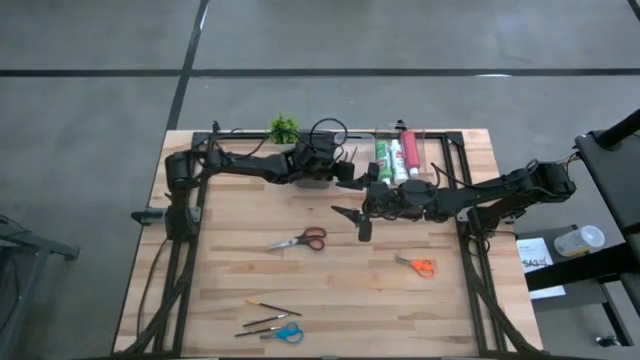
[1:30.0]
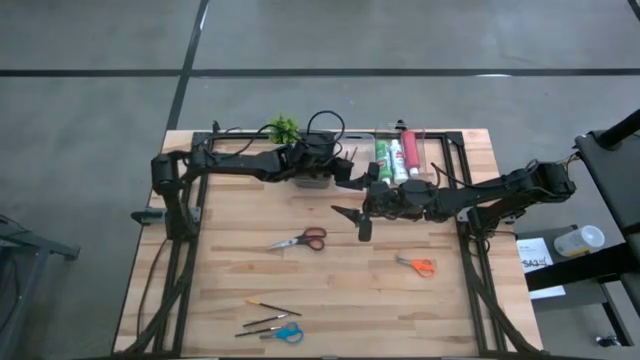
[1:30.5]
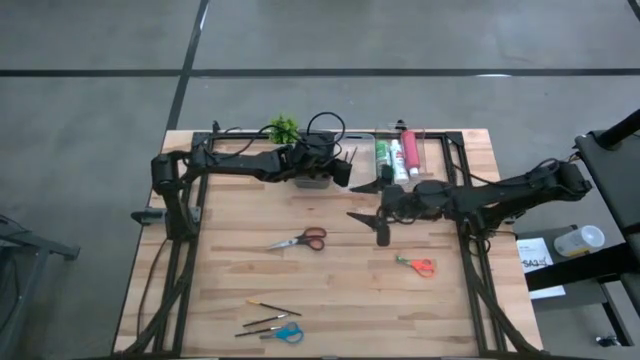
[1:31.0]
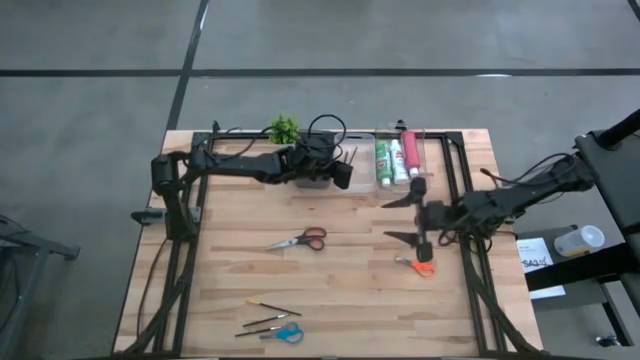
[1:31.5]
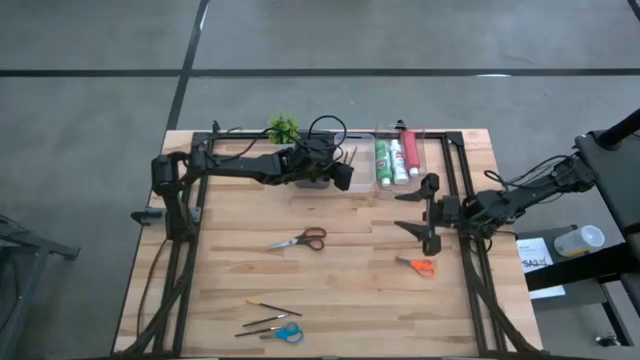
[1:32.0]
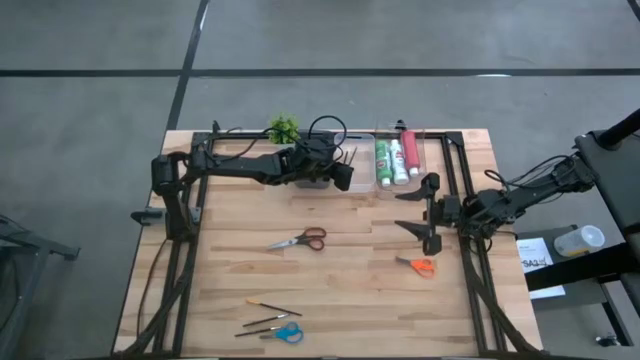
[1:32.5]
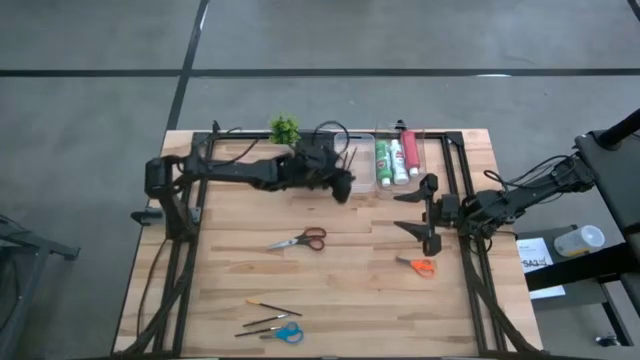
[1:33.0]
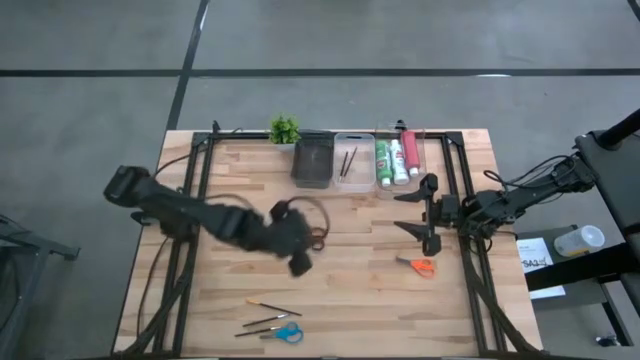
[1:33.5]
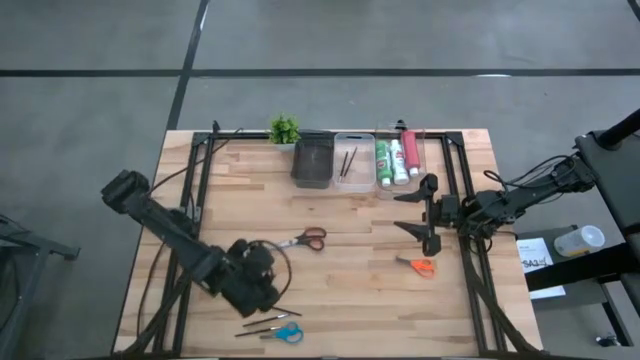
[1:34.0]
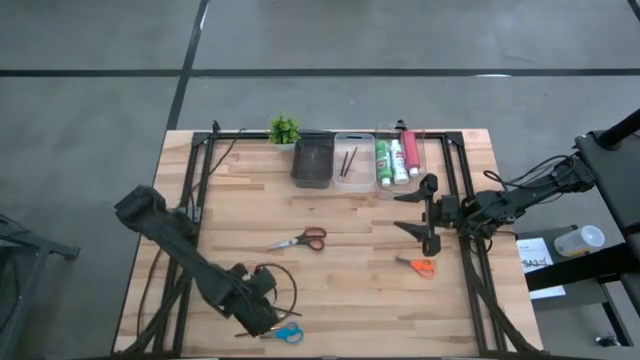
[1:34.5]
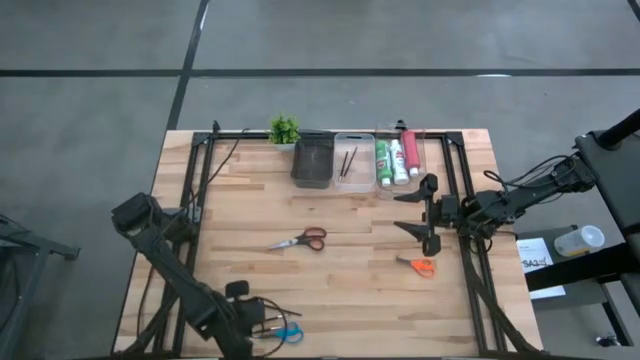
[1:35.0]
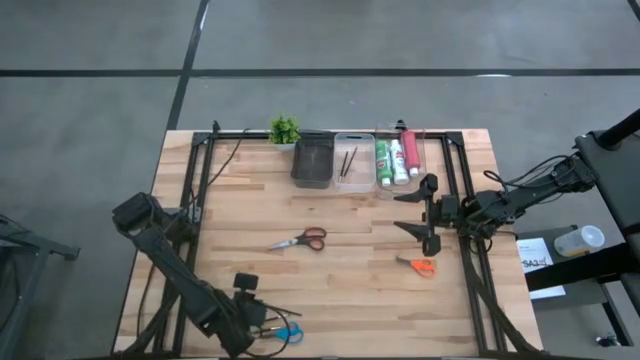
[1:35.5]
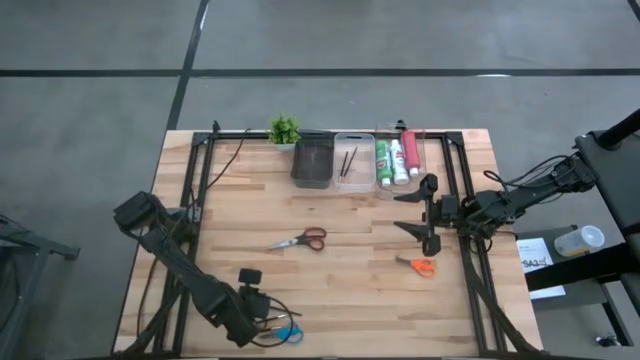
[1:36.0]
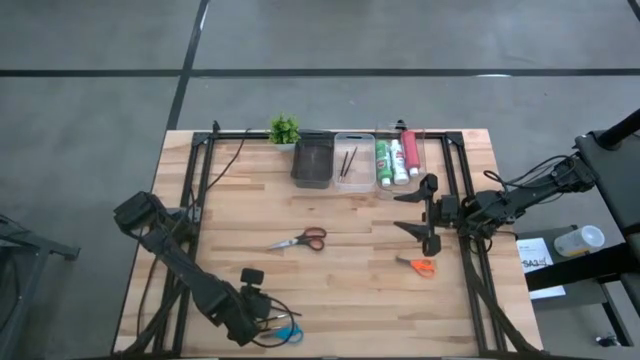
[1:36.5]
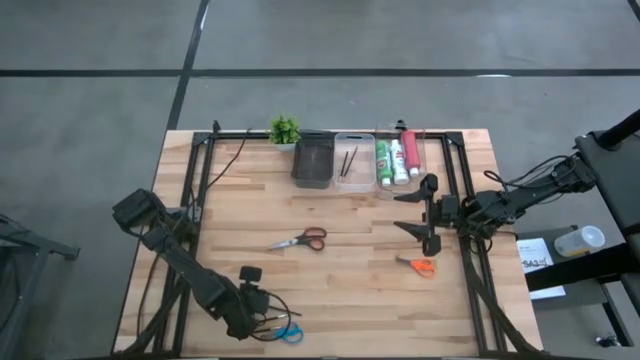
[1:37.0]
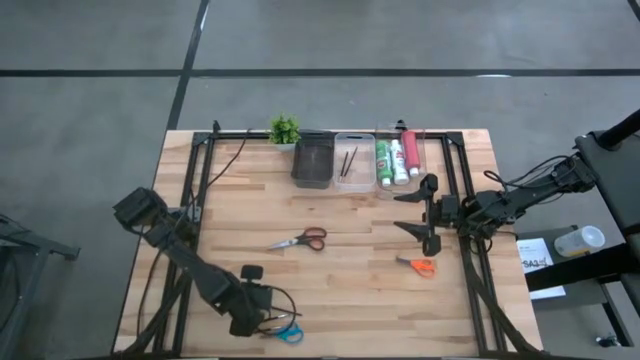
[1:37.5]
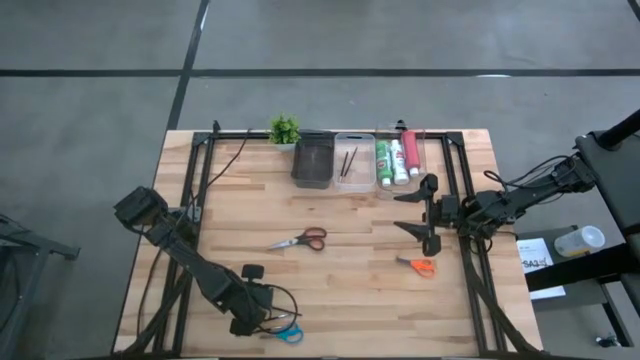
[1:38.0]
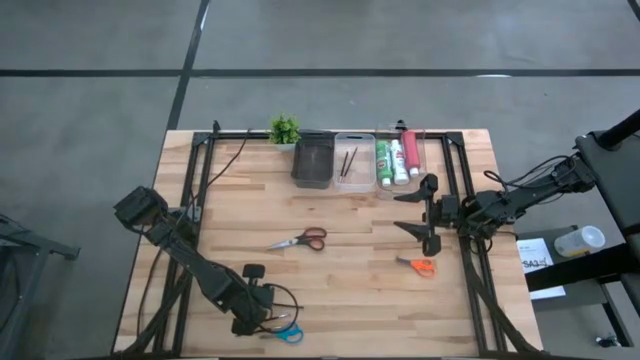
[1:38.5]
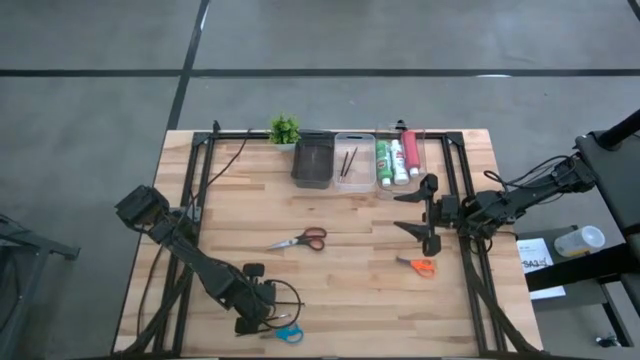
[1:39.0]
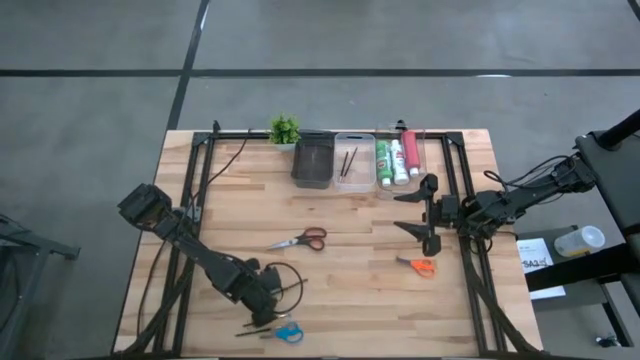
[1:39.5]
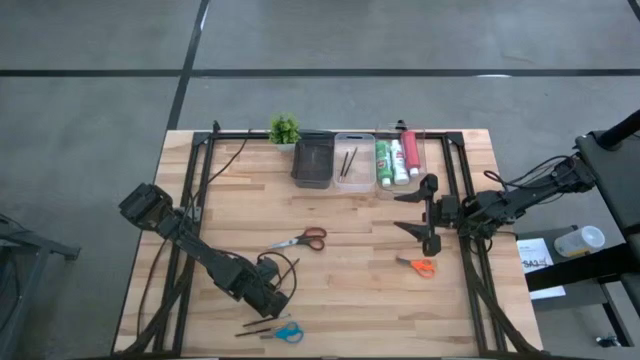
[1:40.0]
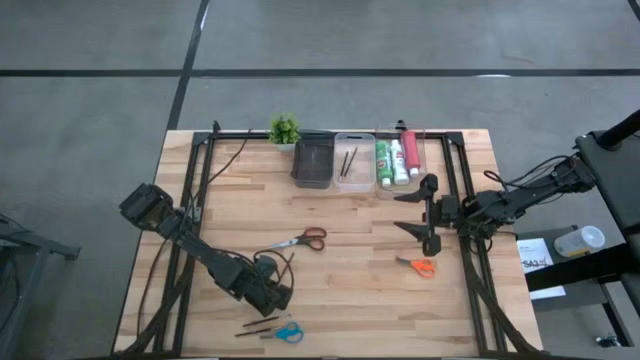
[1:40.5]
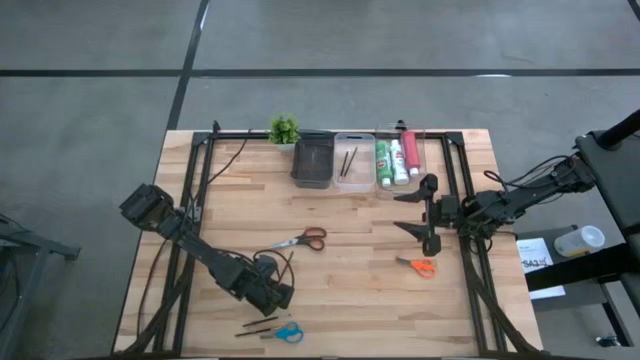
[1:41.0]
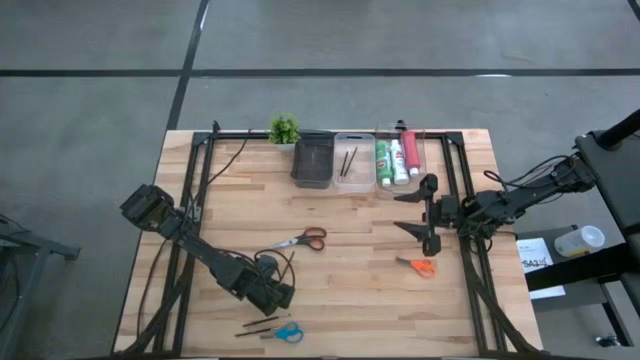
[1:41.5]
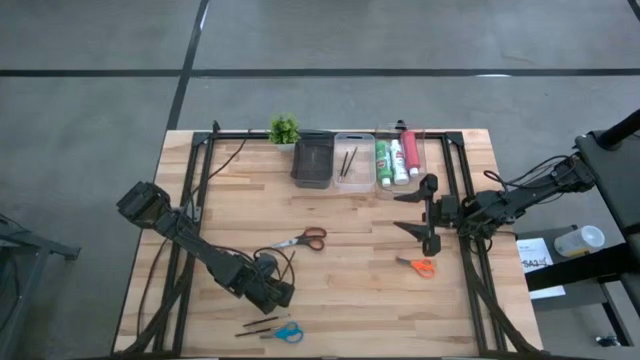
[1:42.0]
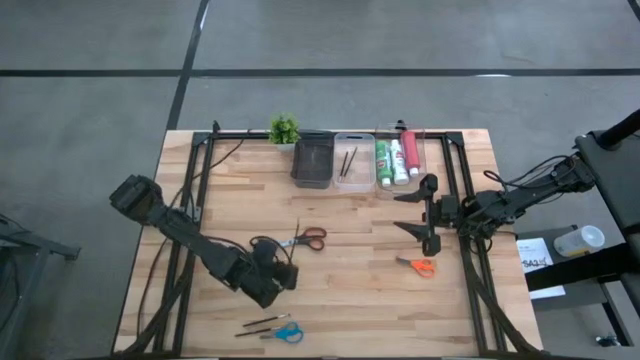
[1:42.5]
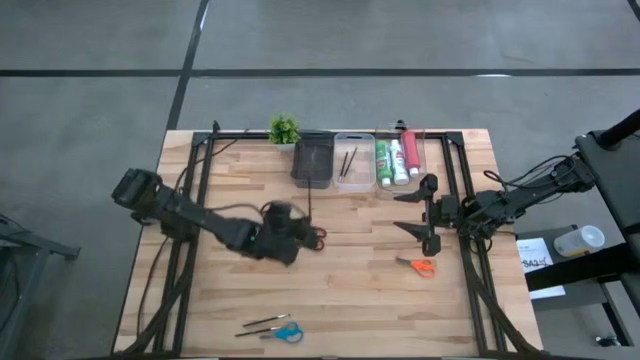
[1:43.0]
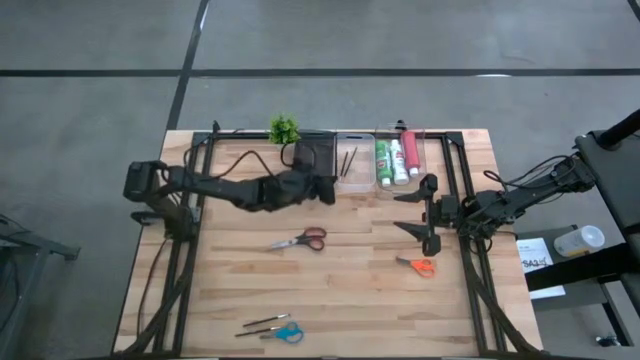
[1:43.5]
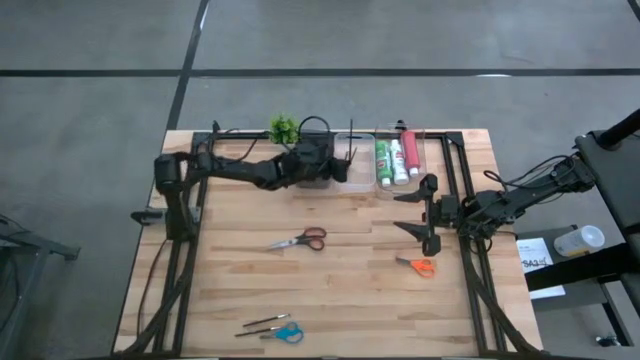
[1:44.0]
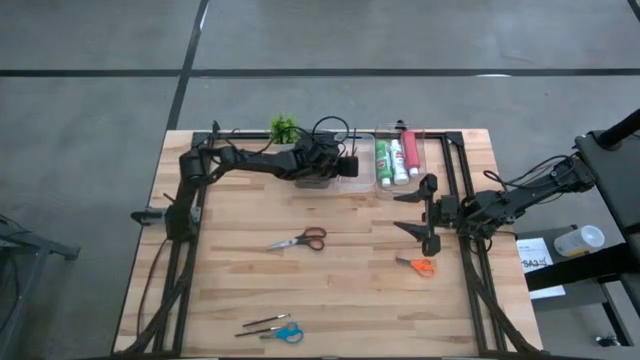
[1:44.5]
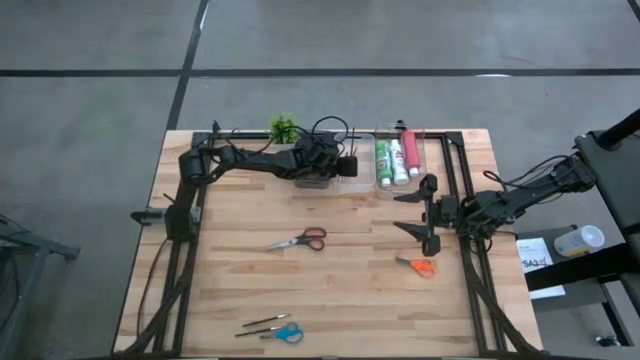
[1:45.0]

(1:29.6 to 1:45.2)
Task: Pick & Place Paint Supplies
Put the gold paint brush into the white transparent bin

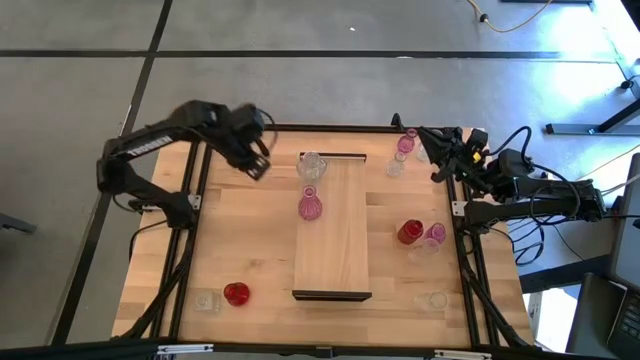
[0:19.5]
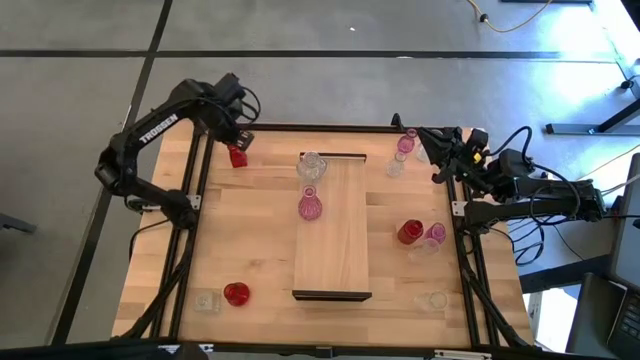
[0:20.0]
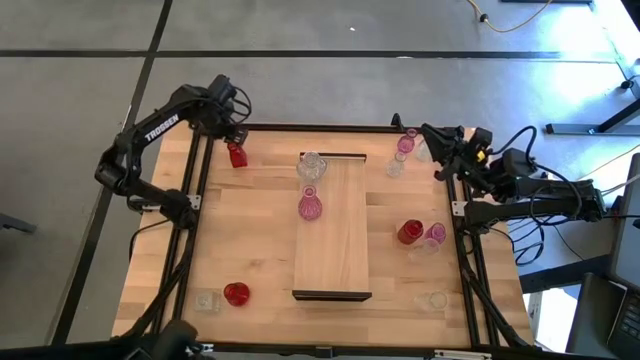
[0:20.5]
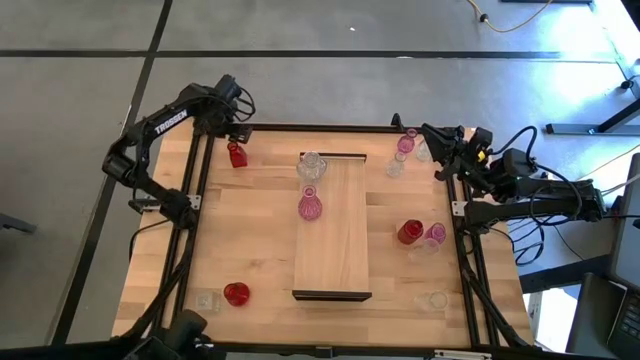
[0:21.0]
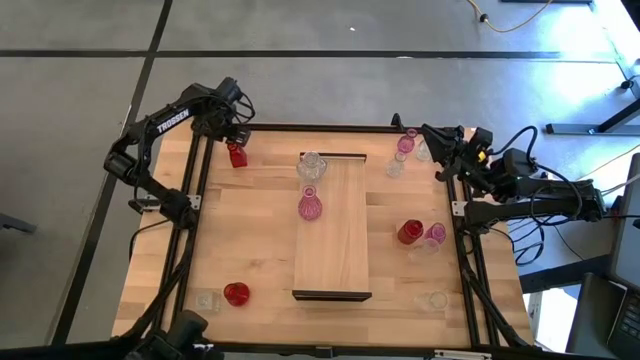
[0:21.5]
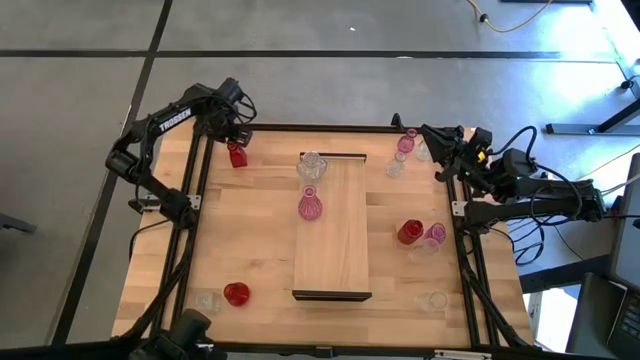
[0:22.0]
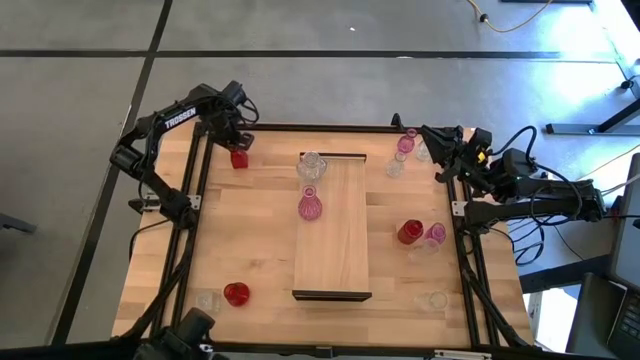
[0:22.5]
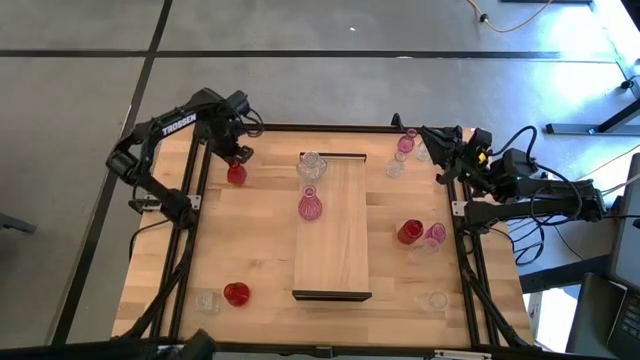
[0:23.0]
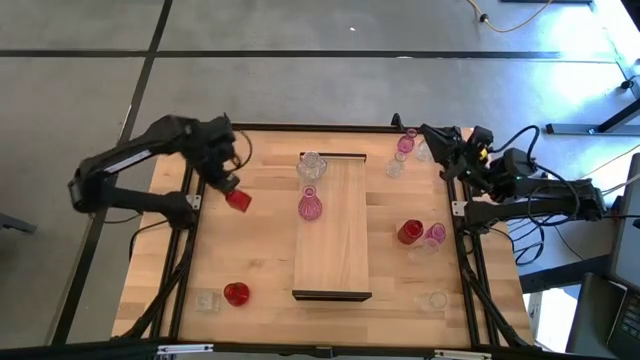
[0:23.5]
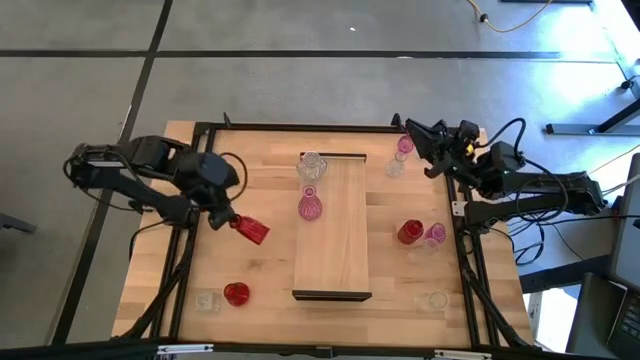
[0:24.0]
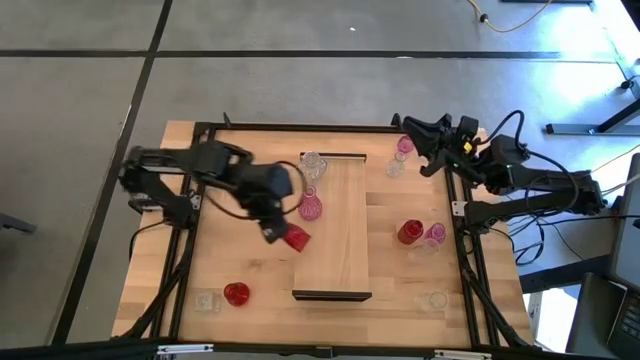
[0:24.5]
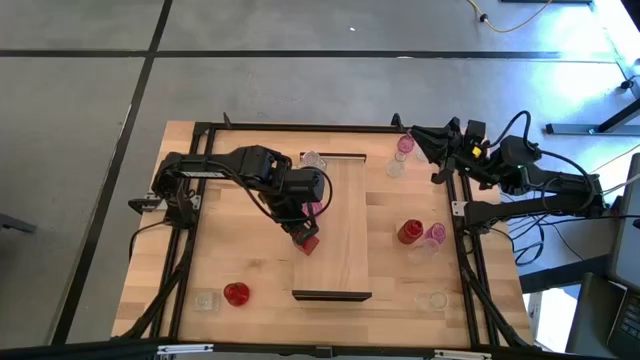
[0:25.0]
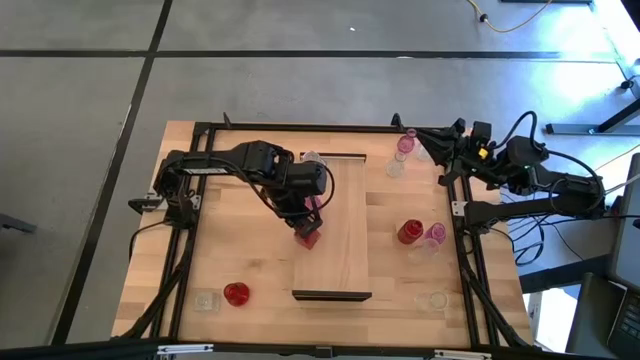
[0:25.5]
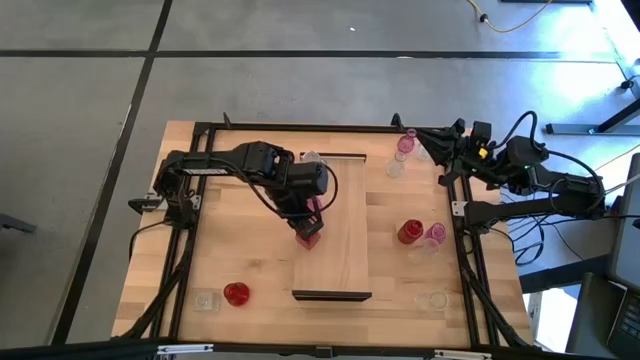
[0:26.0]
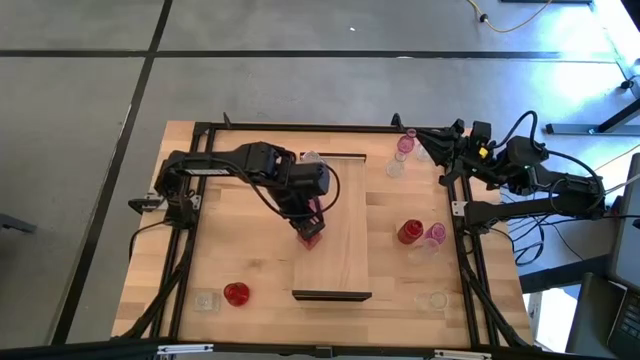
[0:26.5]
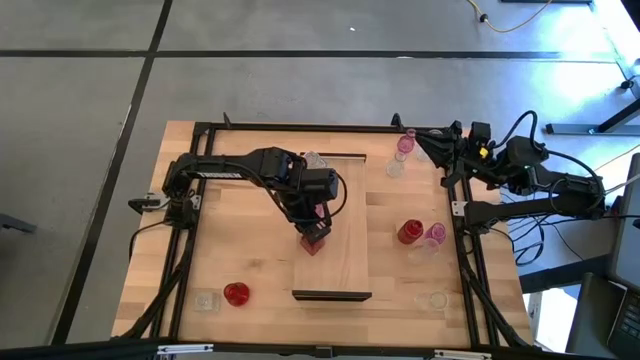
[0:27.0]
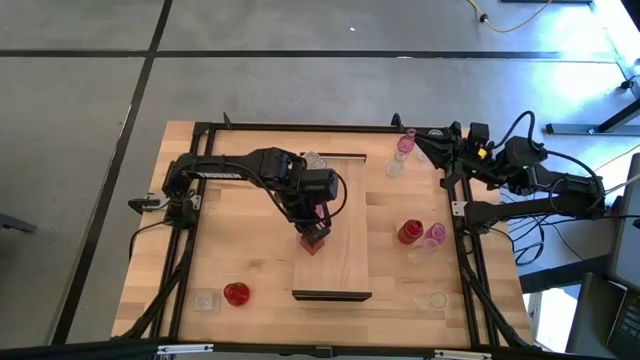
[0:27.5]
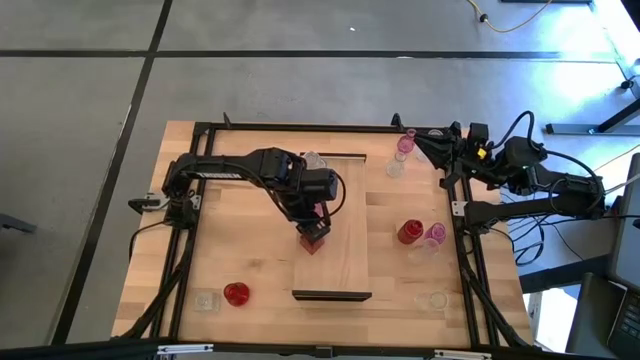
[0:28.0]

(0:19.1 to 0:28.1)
Task: sort vases onto shelf
Put the red vase on the shelf
